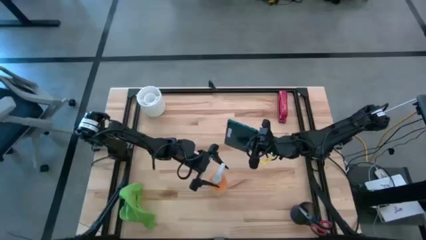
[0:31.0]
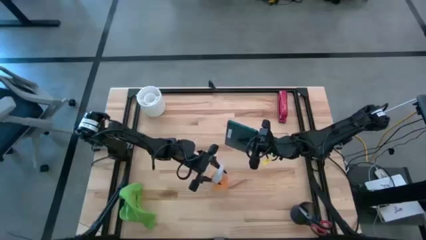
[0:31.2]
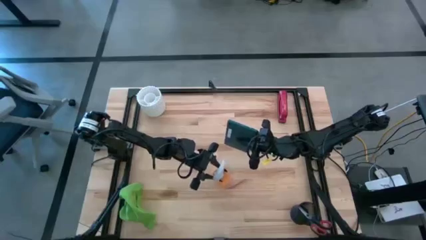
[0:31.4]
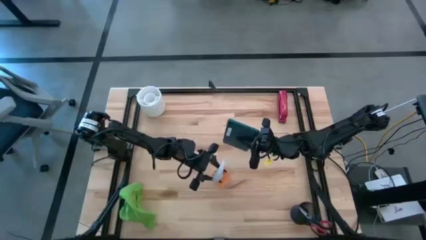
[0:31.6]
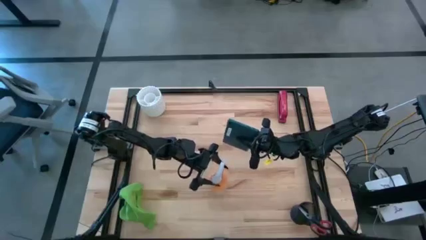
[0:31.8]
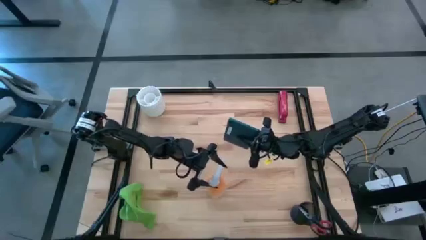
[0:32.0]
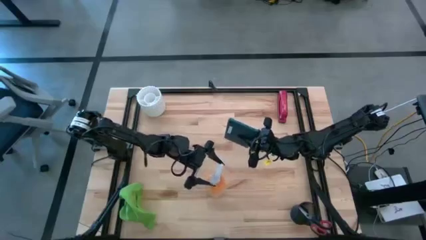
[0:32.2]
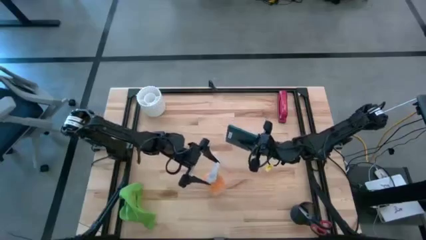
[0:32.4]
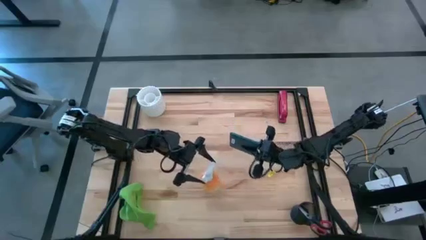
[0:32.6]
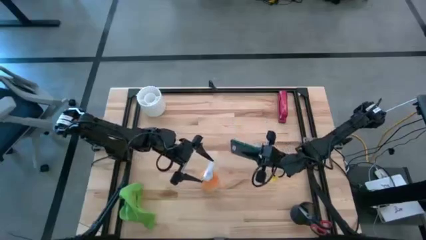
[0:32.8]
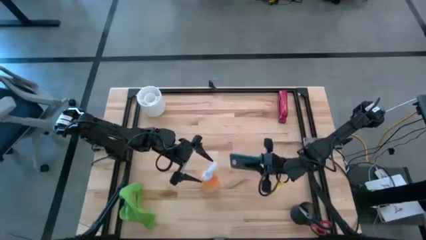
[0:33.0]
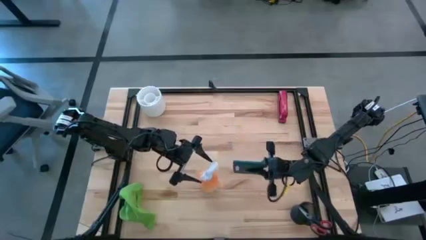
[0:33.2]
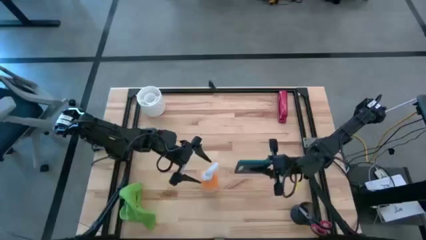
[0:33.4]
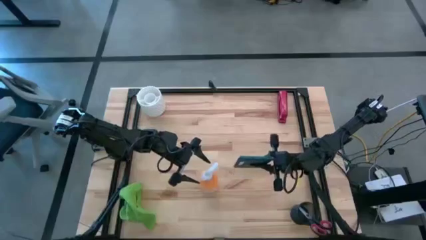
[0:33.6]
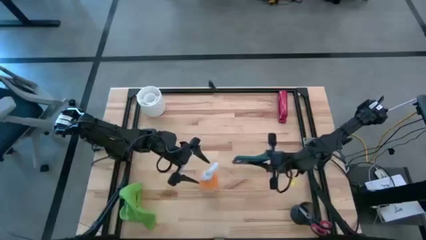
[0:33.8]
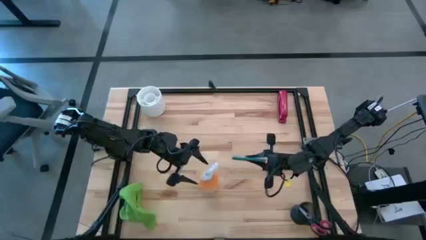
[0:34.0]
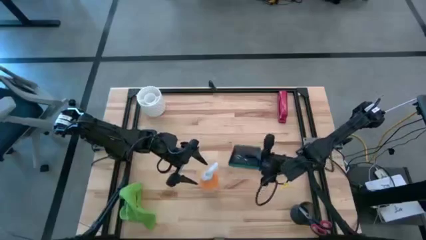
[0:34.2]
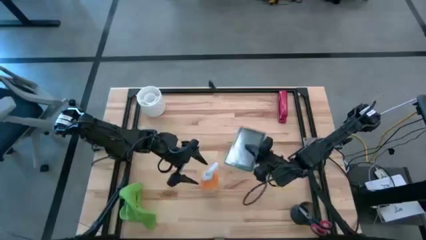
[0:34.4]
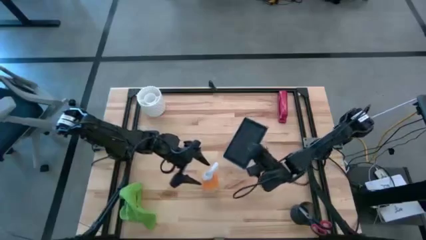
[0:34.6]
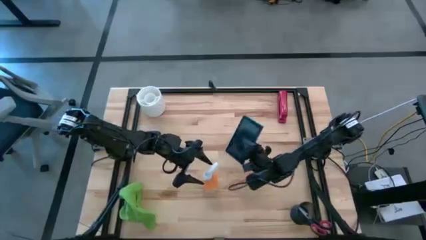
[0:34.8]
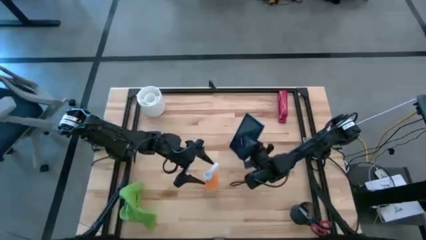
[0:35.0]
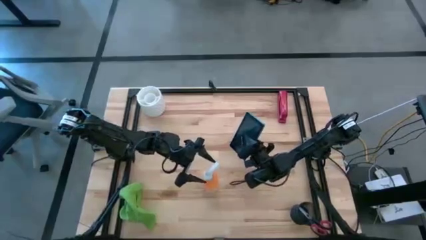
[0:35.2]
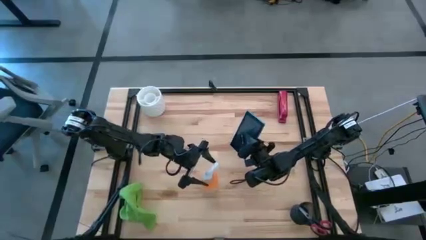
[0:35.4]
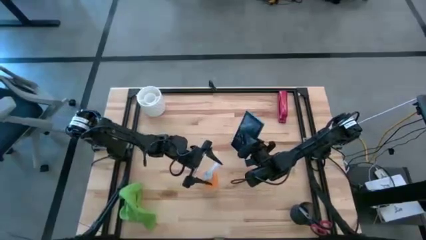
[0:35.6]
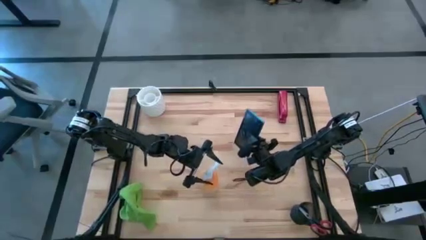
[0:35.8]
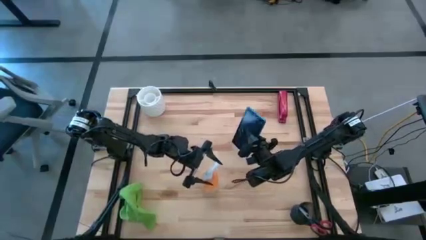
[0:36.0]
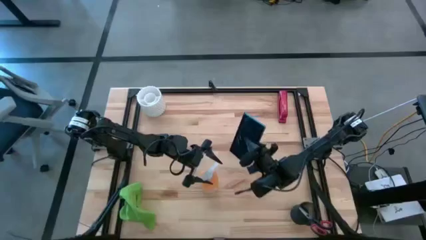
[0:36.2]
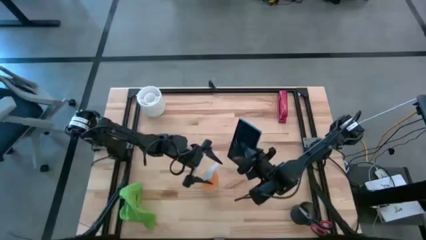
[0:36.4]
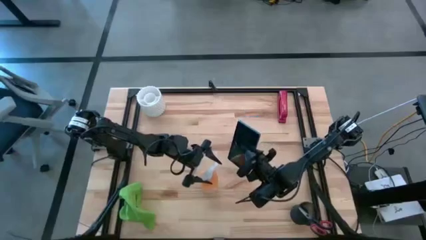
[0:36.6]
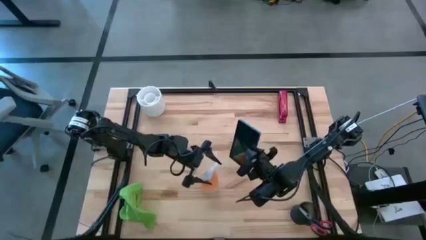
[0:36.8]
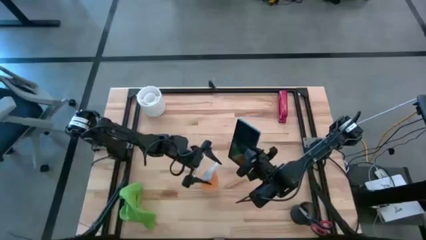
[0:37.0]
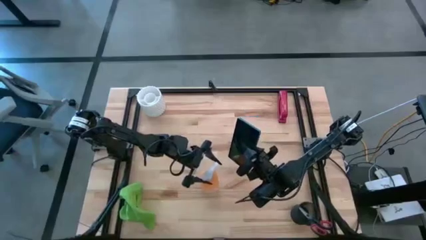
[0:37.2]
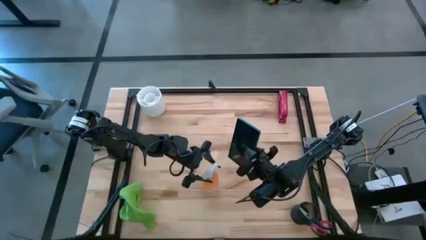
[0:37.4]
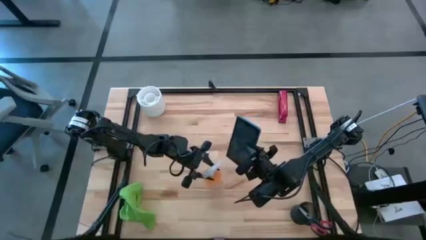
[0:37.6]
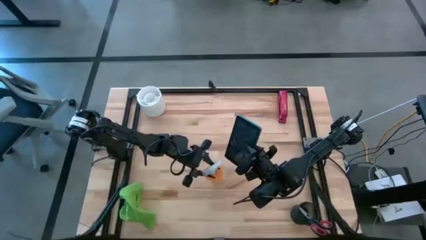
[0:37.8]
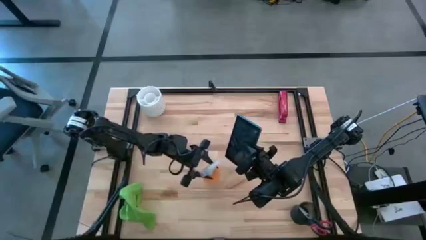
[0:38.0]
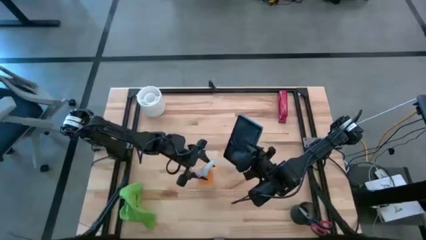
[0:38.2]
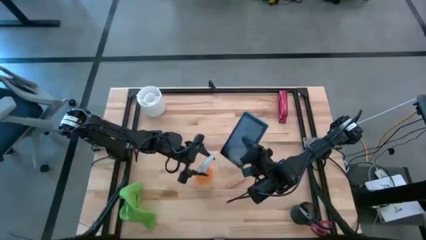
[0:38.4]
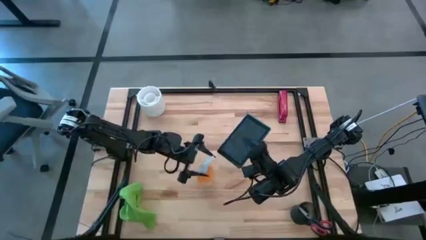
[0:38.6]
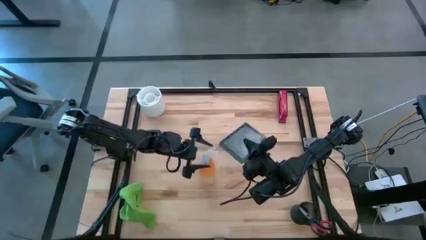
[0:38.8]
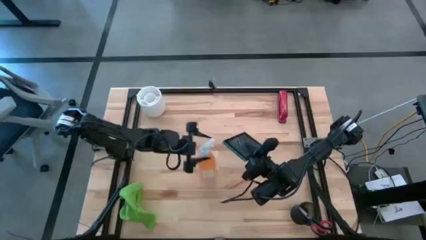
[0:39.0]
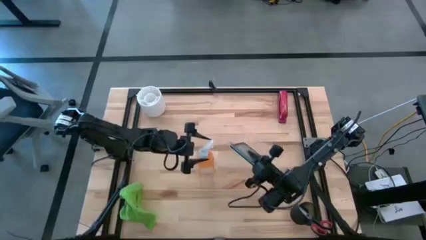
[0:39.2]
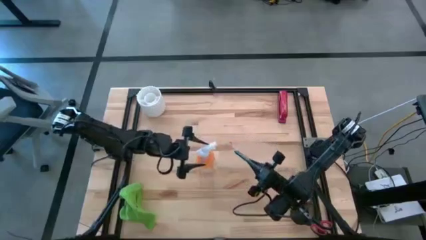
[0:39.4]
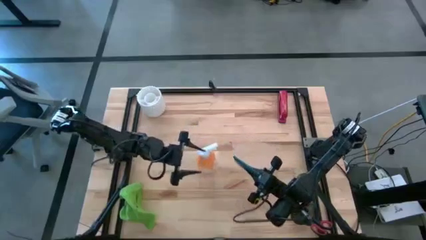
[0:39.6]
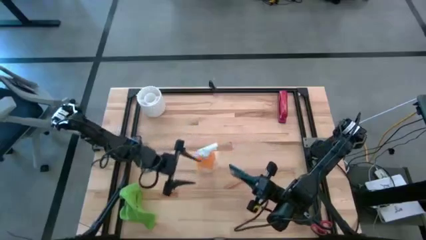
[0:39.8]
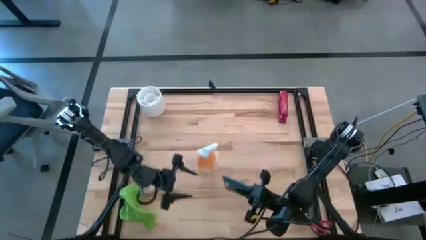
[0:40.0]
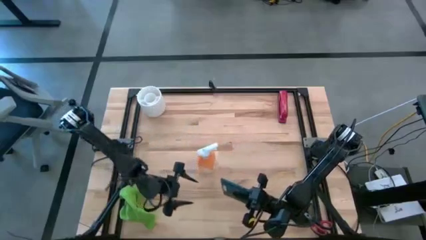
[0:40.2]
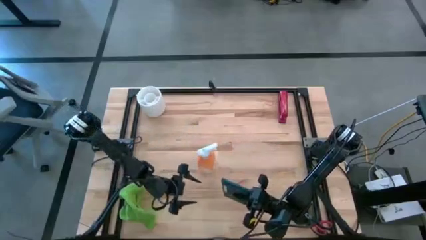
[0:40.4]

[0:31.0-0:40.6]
Task: Apply microfiber cloth
Spray the blue tablet with the orange spray bottle
